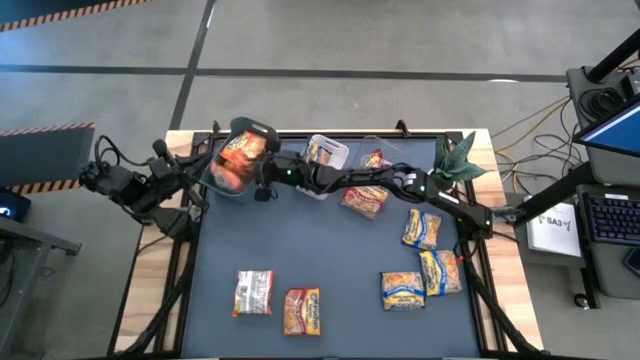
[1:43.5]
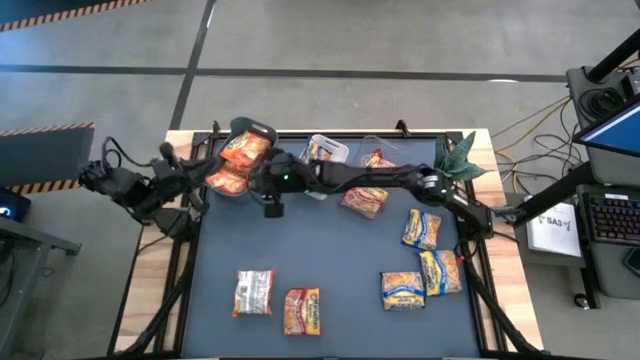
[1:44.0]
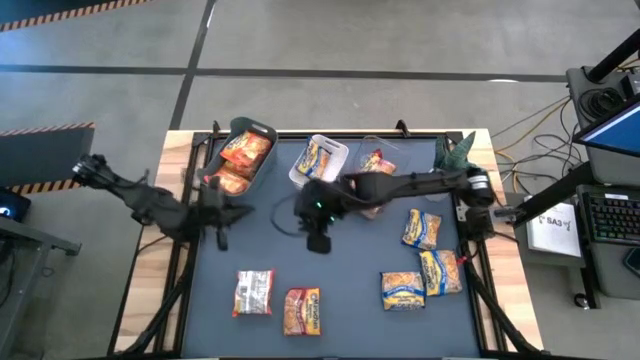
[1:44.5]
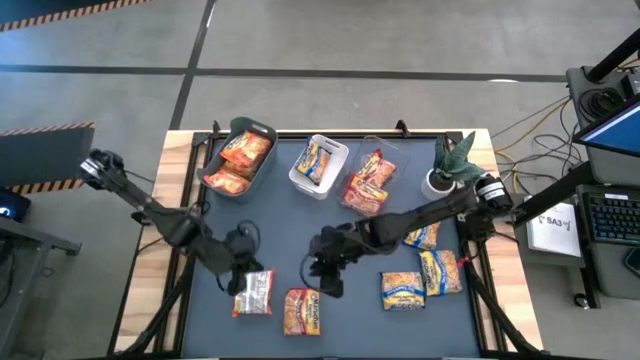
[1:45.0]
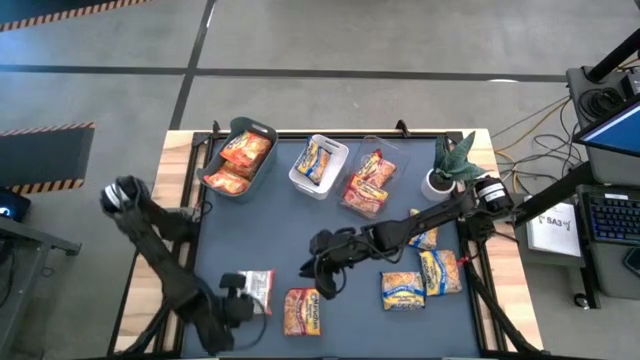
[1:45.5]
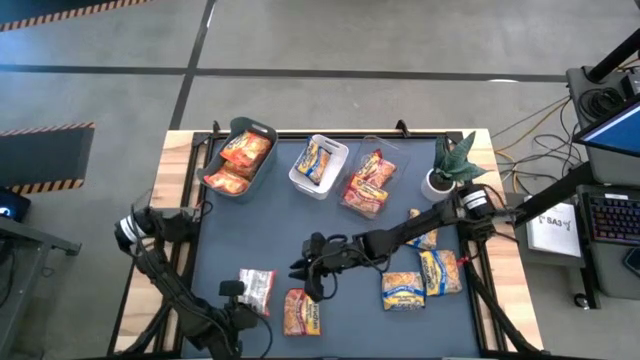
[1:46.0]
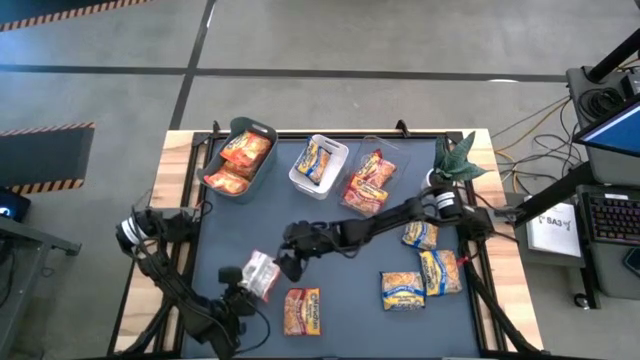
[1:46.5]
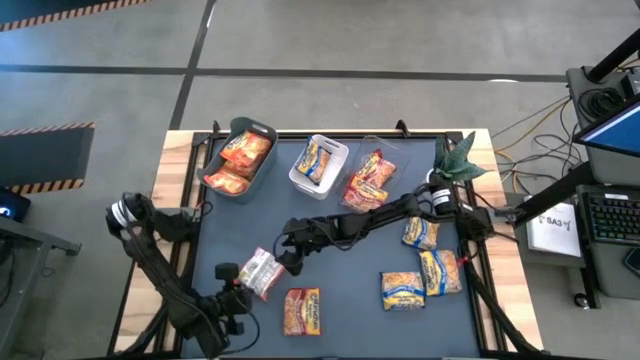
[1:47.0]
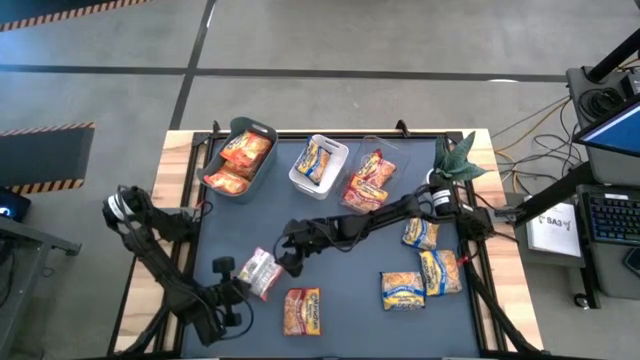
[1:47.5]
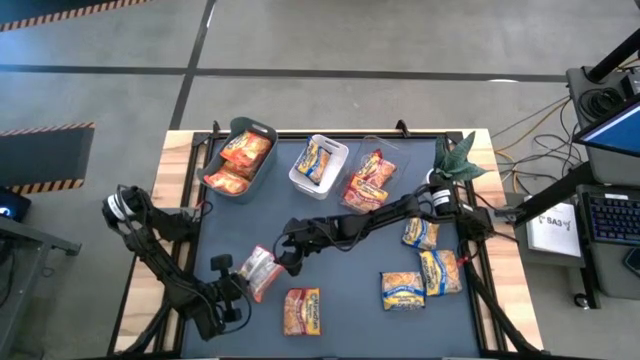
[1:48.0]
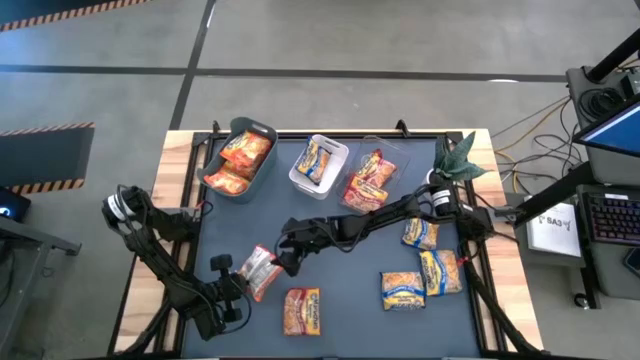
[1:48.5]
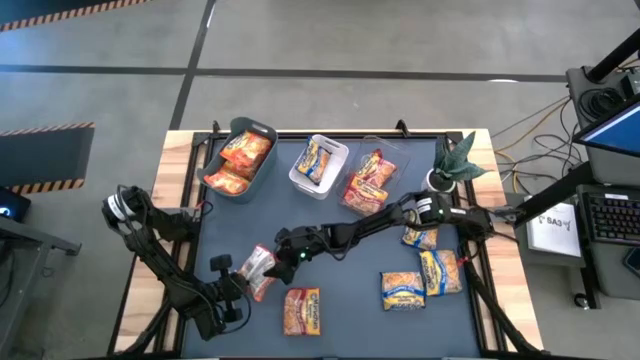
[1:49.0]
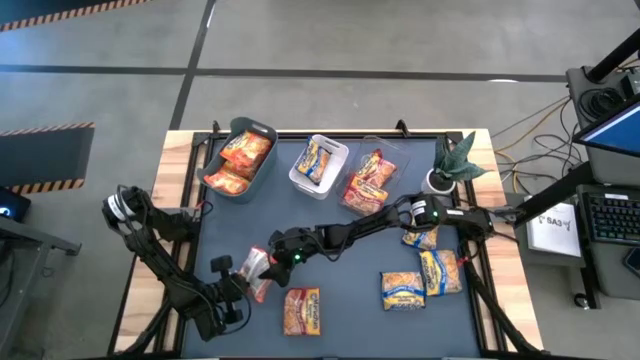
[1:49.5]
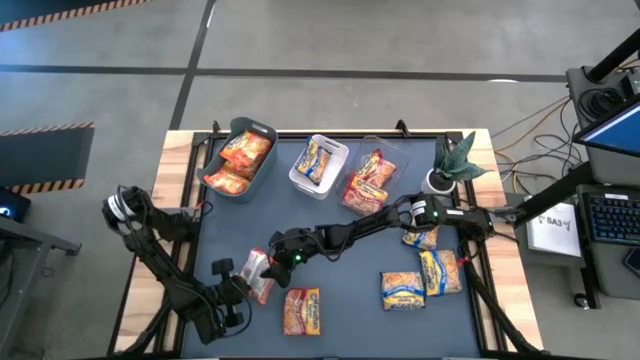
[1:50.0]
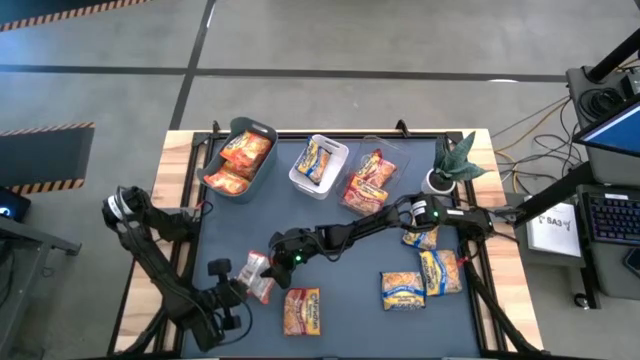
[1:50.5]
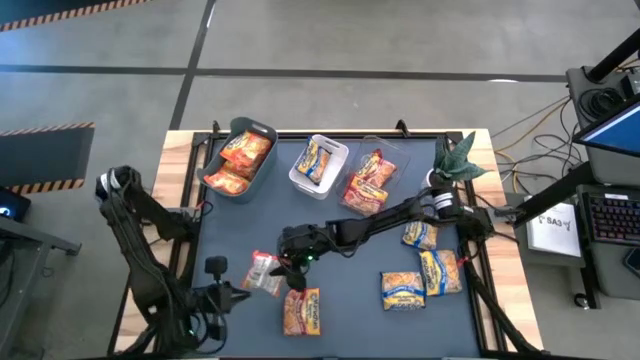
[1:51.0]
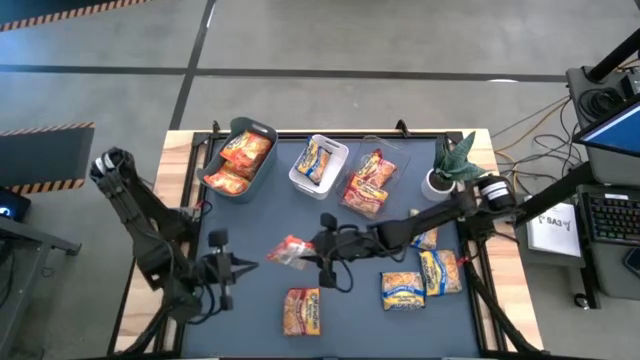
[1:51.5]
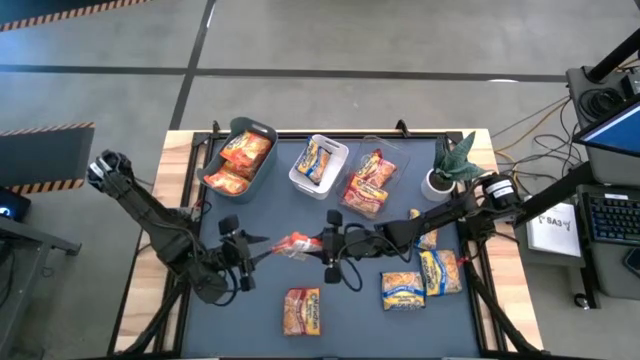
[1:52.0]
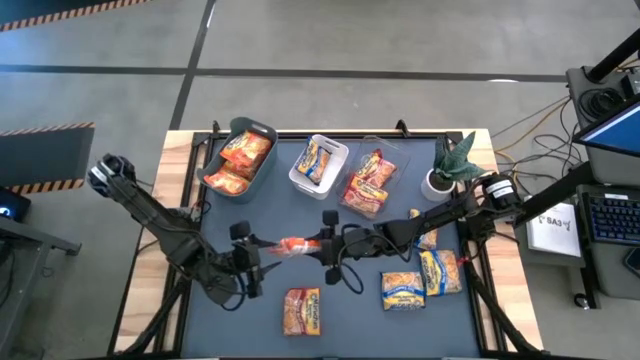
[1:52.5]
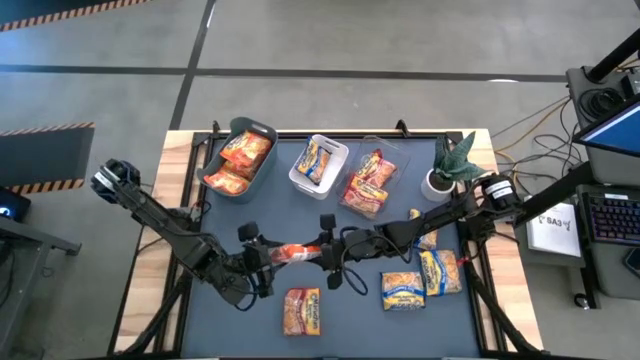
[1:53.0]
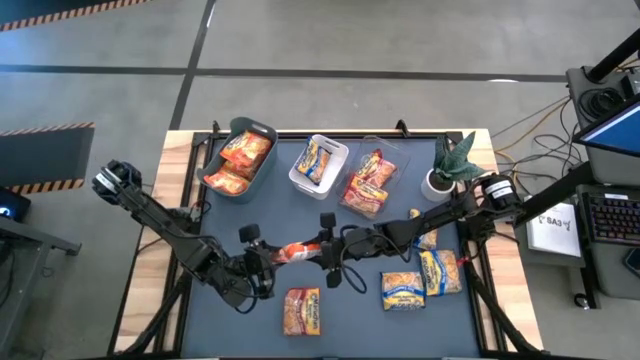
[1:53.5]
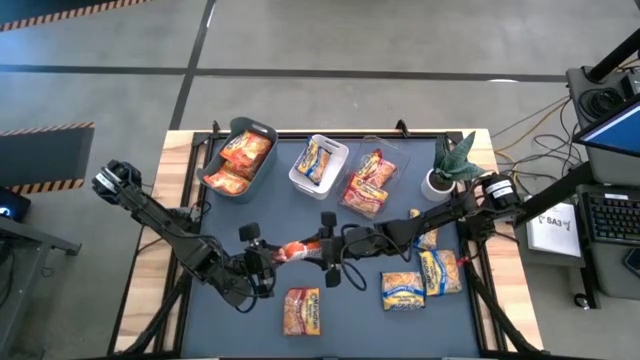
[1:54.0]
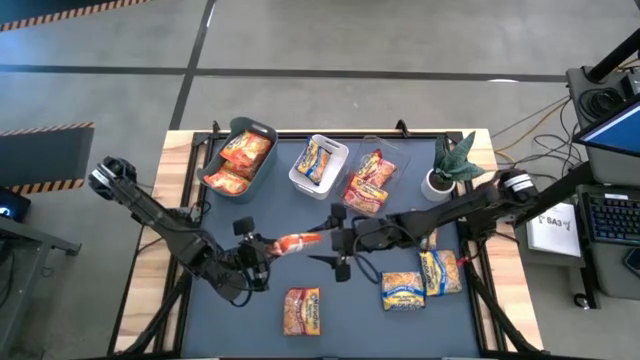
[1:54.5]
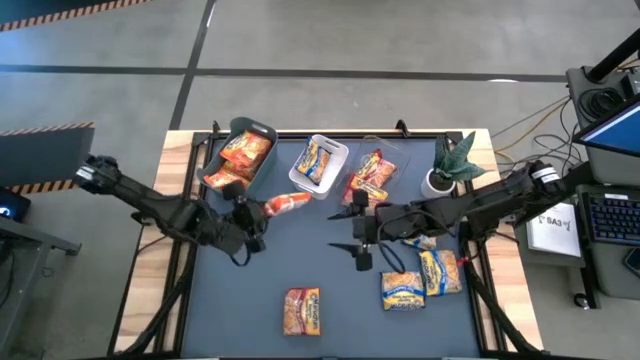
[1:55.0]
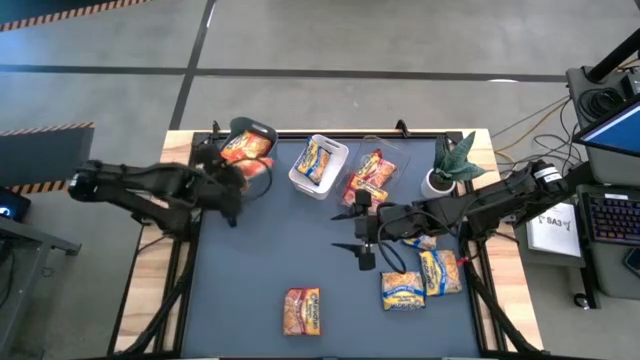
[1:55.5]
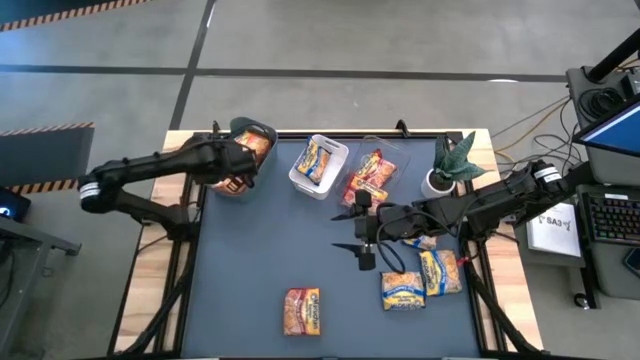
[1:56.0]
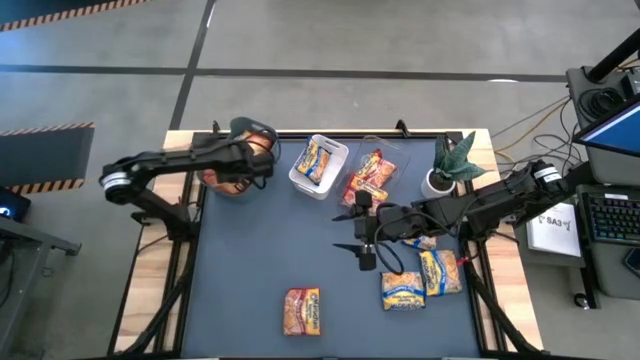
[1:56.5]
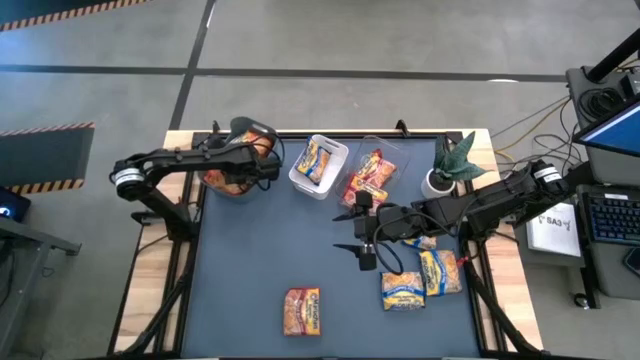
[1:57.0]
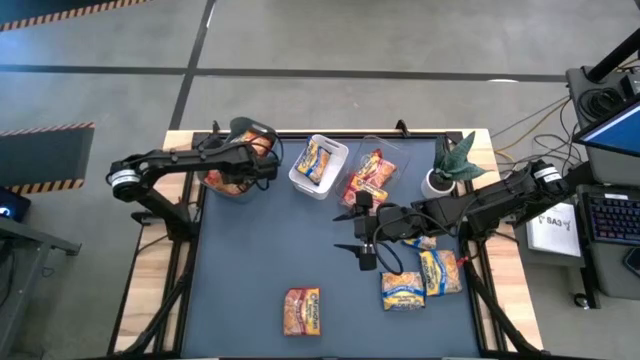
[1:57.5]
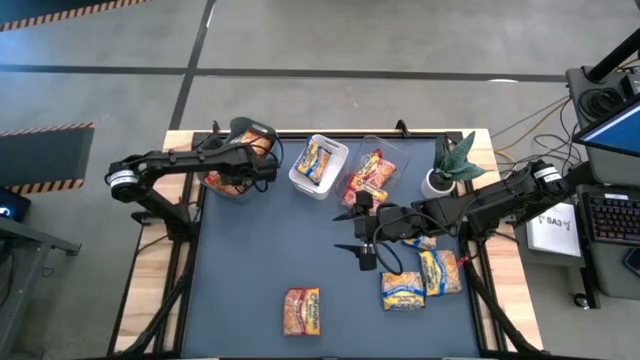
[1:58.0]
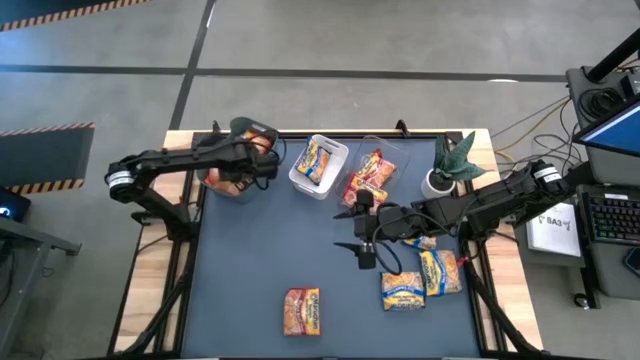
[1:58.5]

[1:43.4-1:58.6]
Task: Sort Maruchan noodles
Put the orange noodle pack into the blue bin

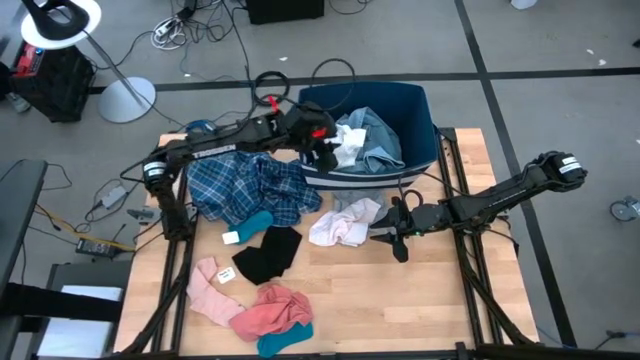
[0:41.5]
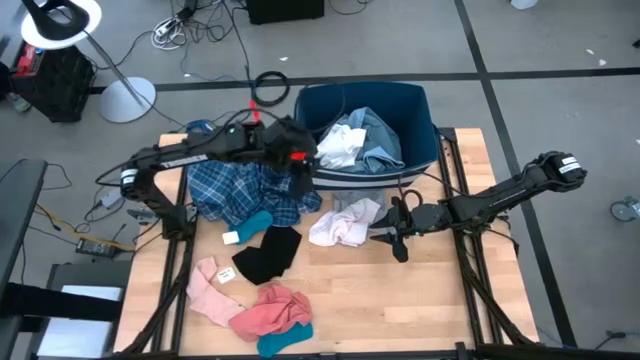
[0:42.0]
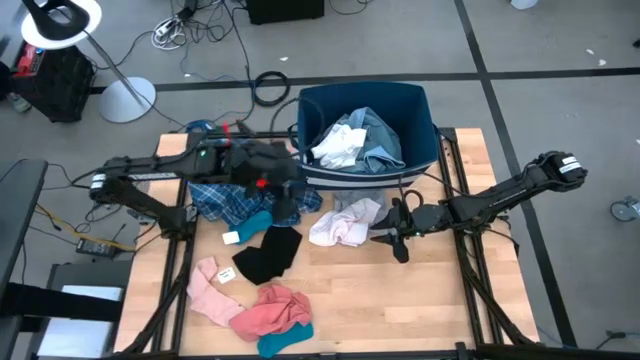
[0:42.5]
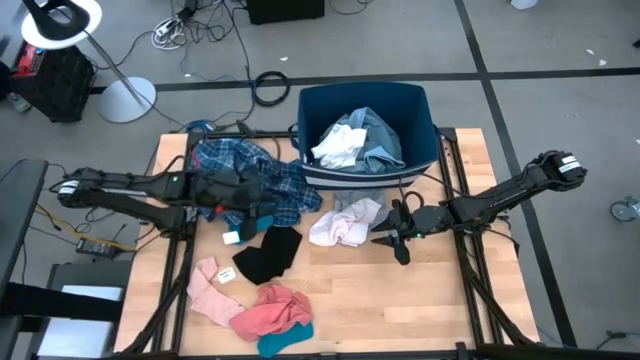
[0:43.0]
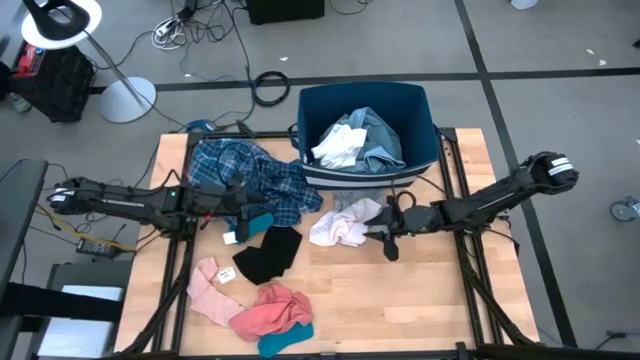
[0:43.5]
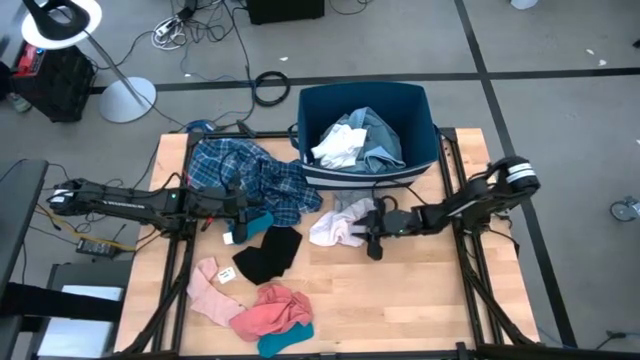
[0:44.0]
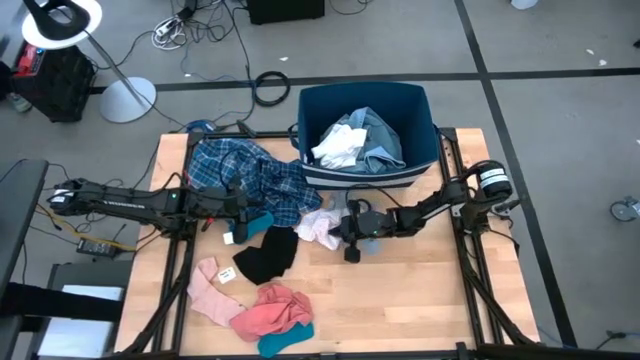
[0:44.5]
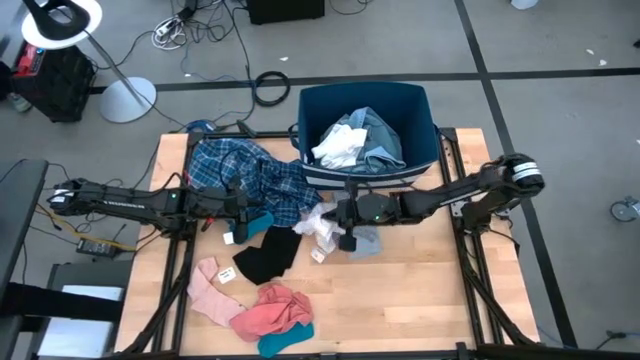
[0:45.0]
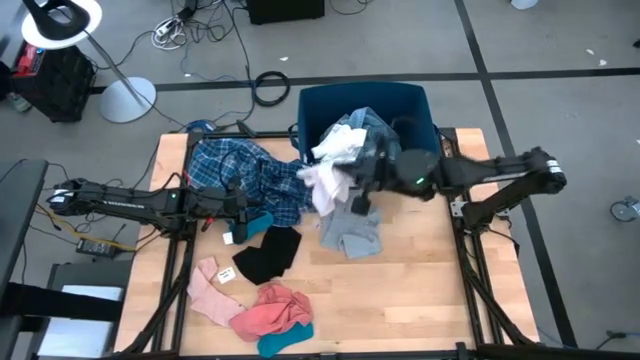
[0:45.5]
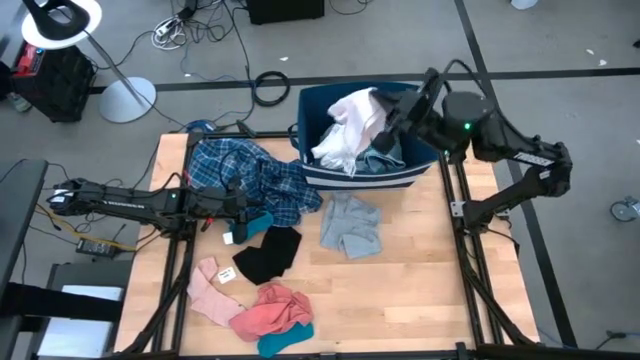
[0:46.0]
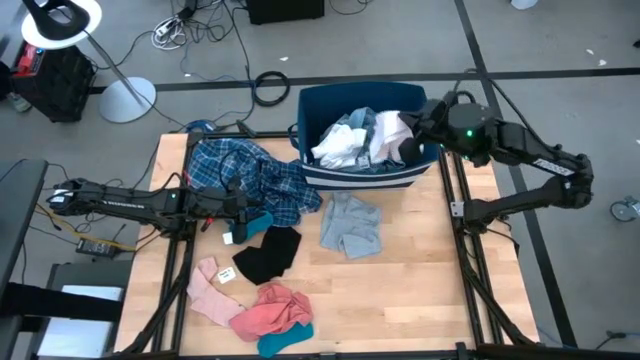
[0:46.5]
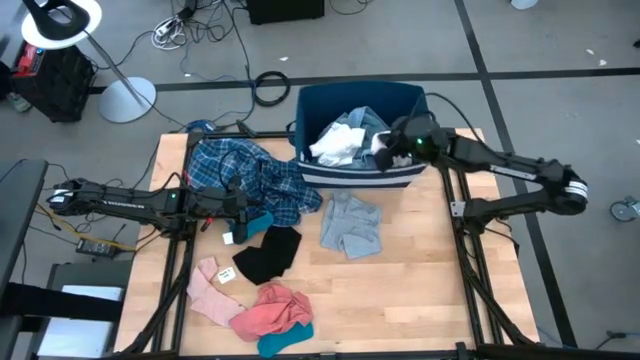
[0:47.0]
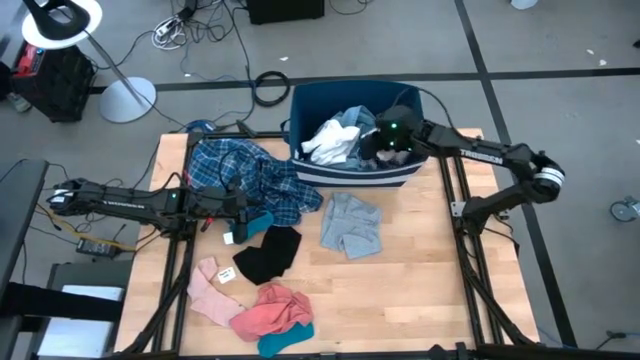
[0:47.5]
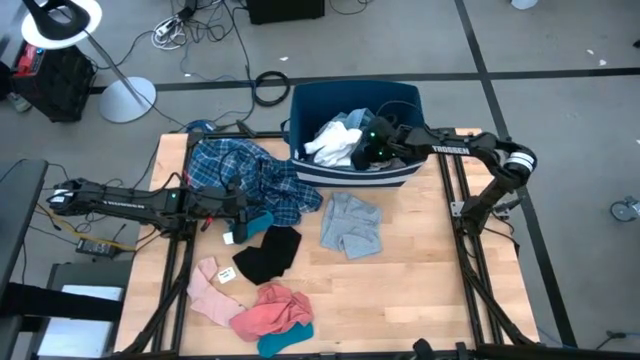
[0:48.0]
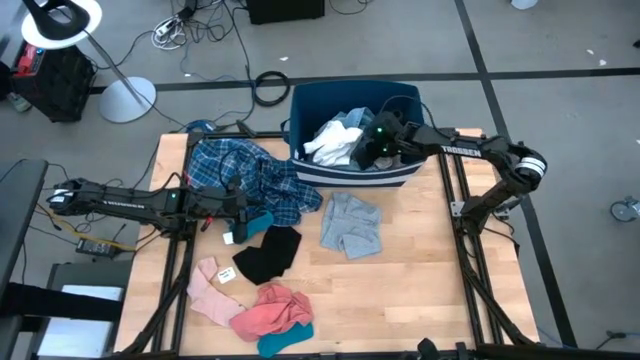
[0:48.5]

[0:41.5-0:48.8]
Task: Sort clothes
Put the light pink underwear into the blue bin
